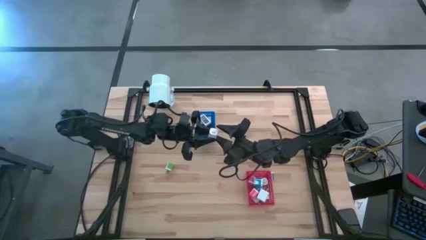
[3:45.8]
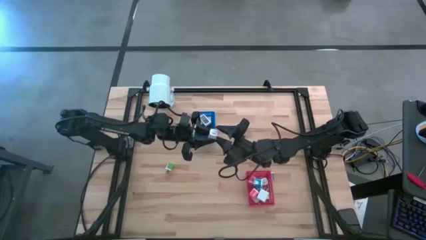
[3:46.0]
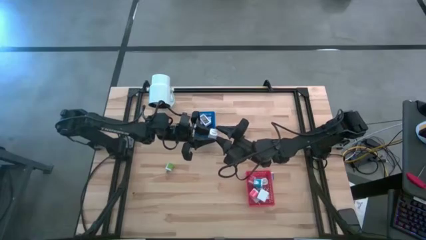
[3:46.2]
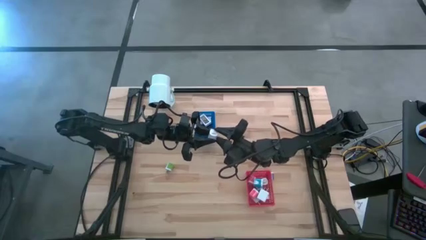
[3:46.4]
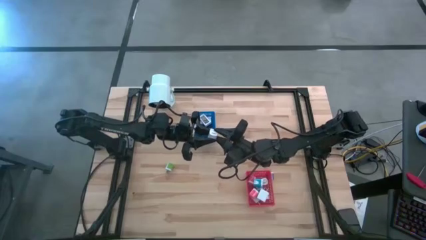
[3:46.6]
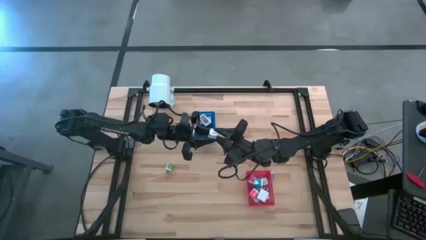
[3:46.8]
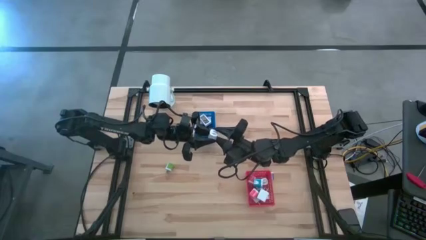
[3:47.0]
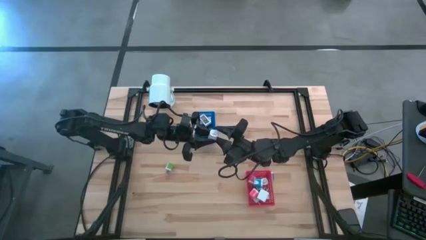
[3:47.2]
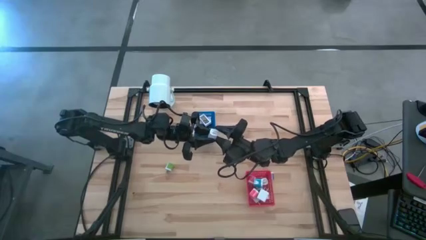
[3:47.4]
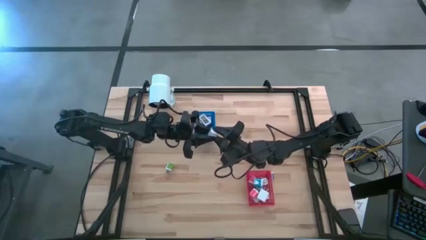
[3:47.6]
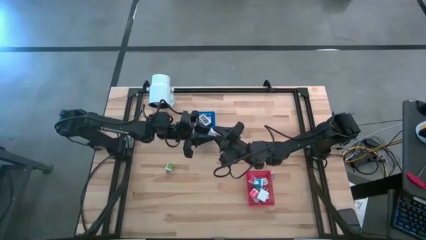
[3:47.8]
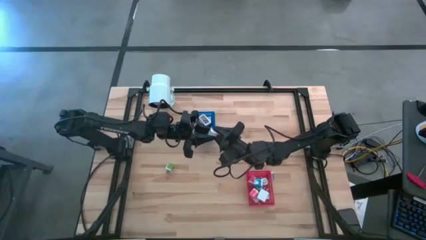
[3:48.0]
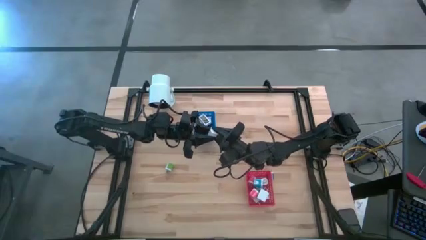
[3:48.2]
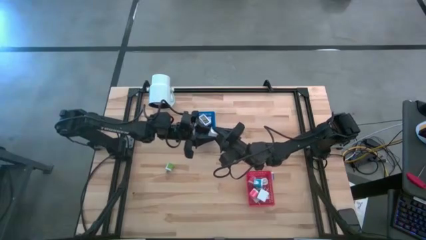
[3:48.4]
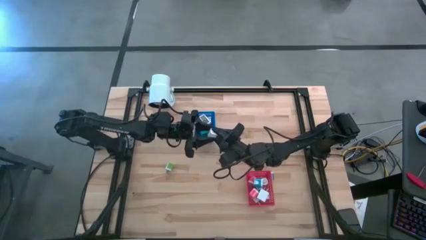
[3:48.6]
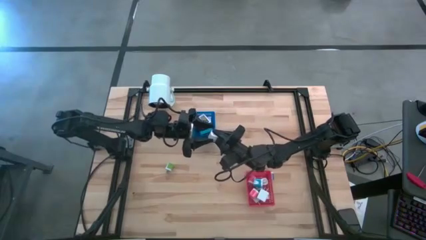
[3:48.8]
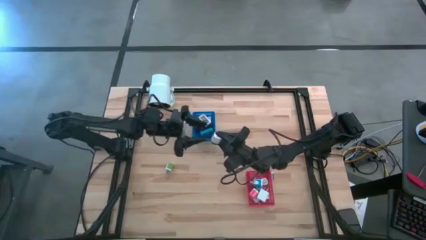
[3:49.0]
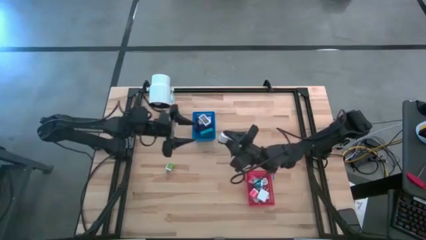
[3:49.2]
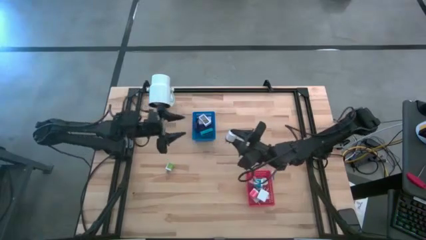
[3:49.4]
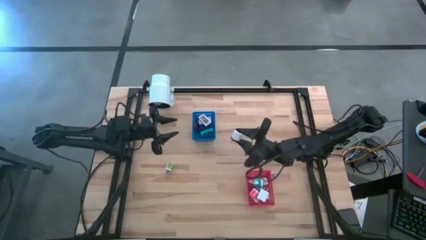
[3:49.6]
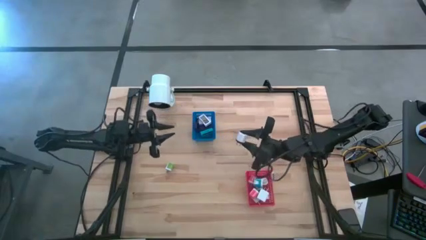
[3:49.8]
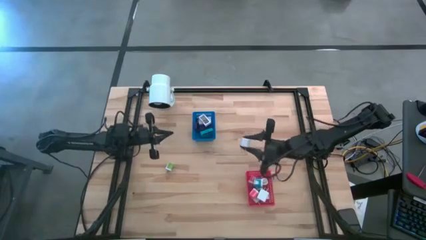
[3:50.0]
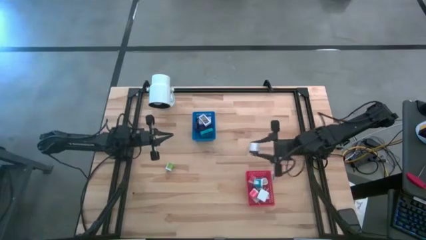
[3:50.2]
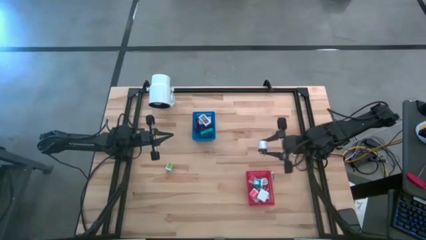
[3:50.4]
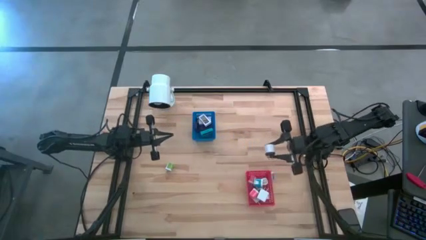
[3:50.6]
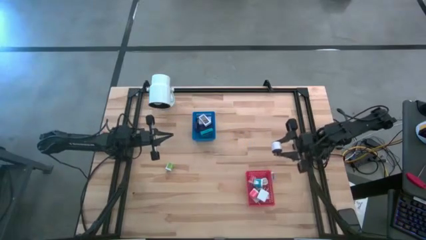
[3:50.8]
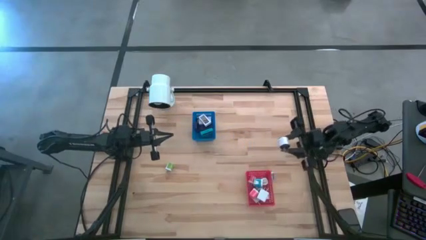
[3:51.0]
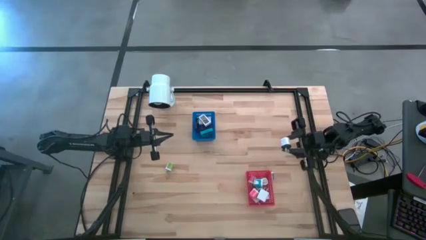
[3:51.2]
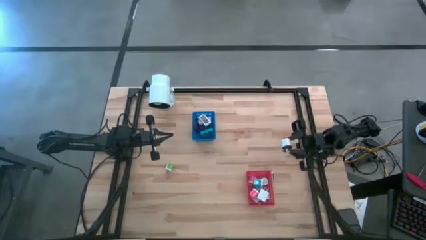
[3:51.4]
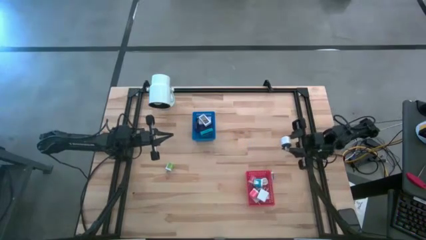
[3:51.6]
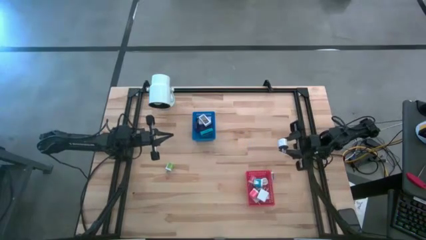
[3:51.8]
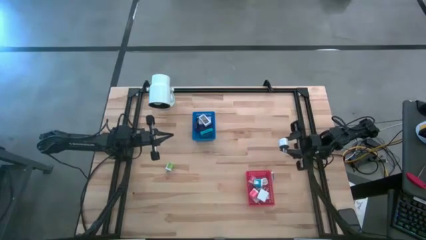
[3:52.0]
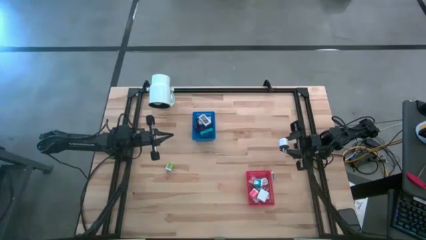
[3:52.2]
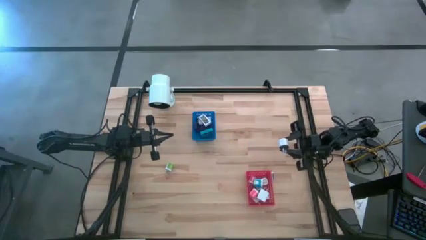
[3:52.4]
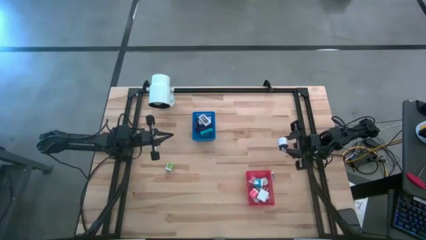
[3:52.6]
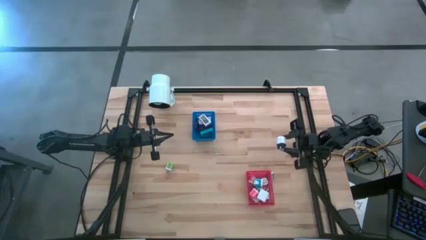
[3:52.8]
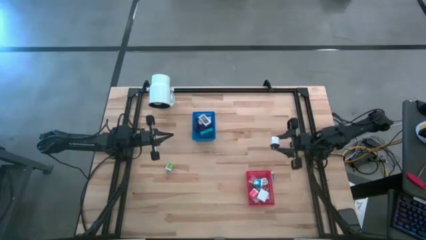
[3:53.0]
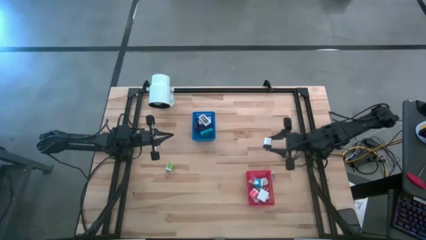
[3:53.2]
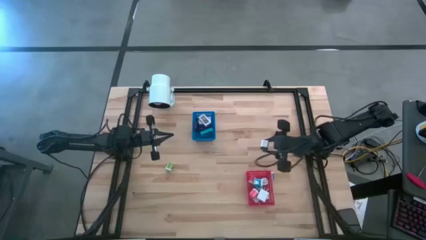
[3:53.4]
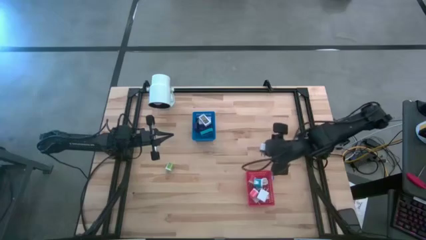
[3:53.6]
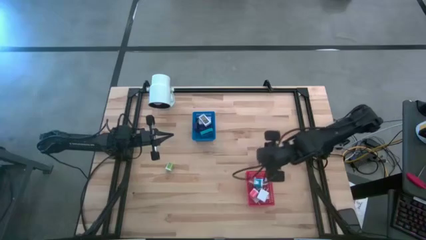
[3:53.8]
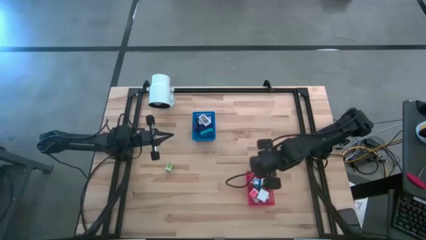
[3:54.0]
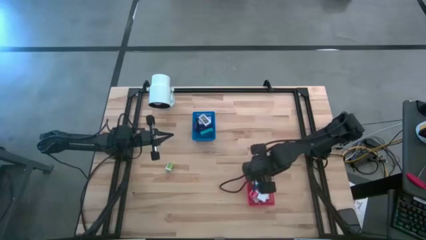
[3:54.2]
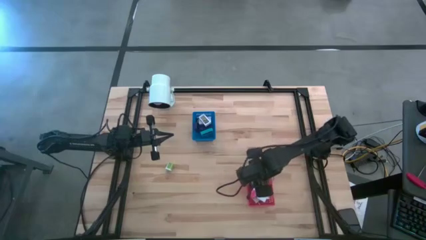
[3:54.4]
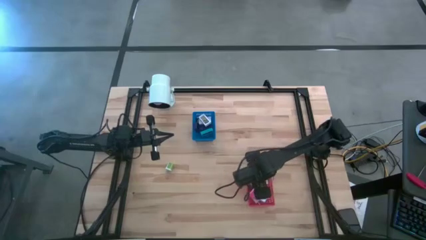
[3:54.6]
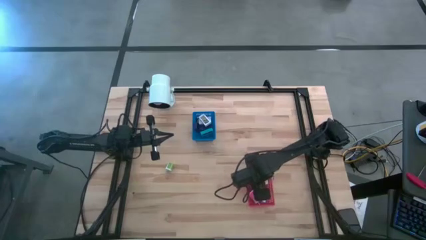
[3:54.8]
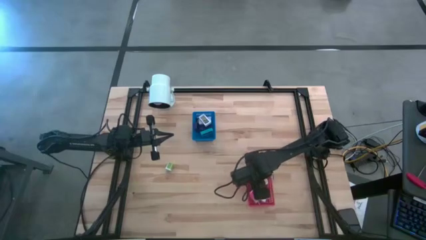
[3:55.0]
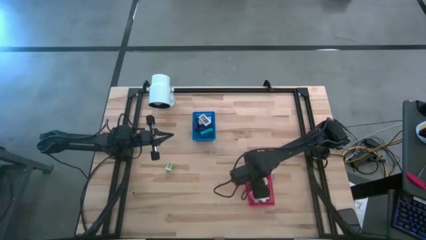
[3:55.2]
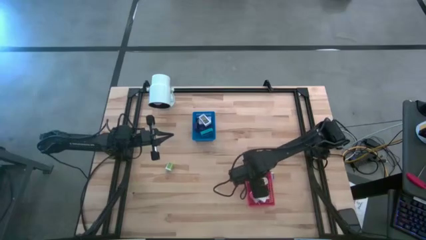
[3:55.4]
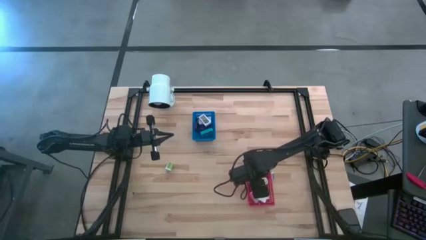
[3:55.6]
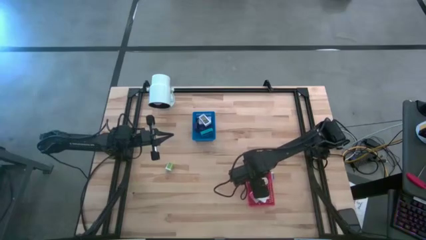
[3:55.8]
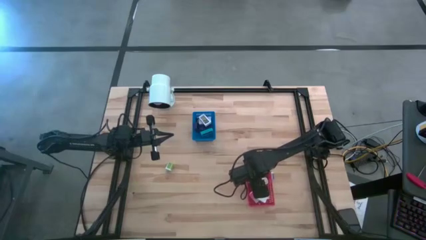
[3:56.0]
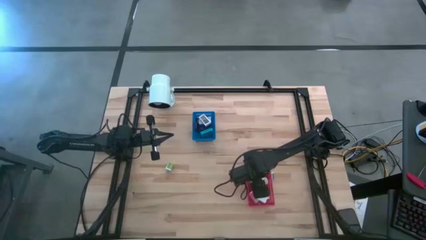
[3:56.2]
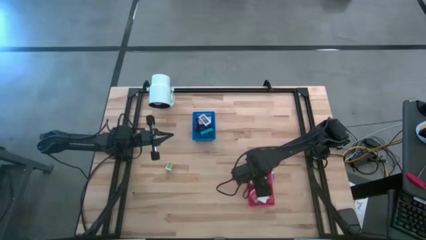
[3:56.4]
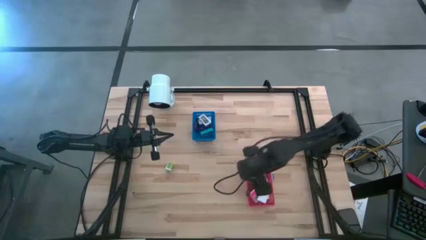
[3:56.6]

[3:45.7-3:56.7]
Task: Pick & Place Office items
Put the white and black charger adapter into the red bin

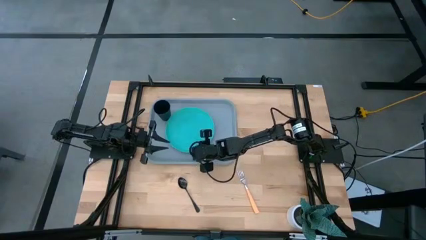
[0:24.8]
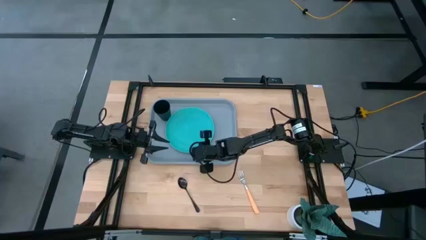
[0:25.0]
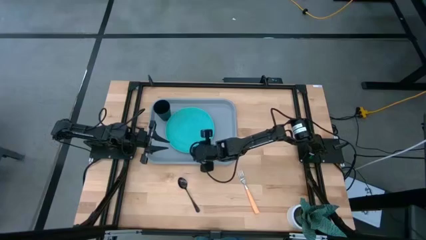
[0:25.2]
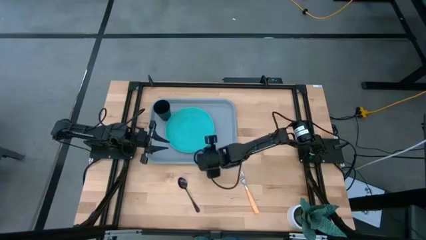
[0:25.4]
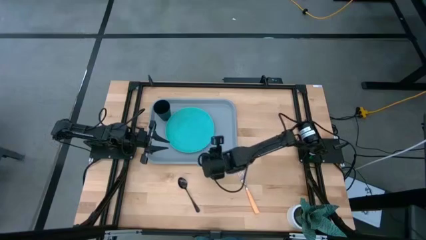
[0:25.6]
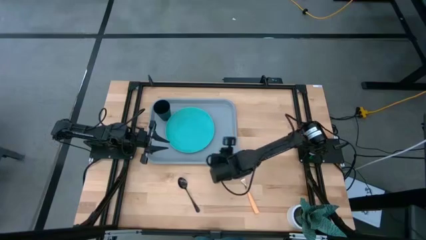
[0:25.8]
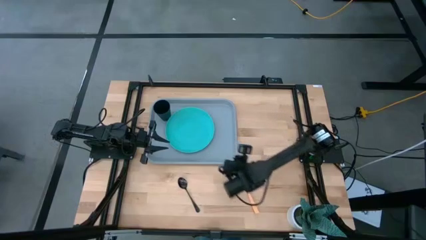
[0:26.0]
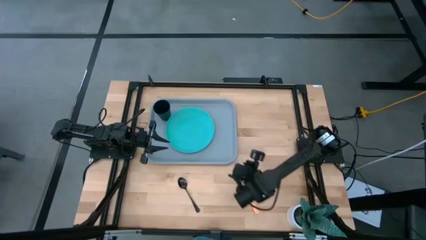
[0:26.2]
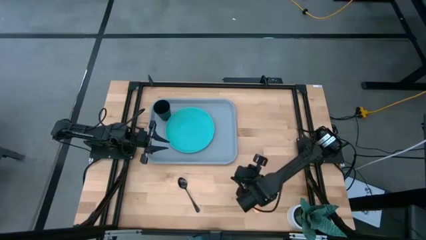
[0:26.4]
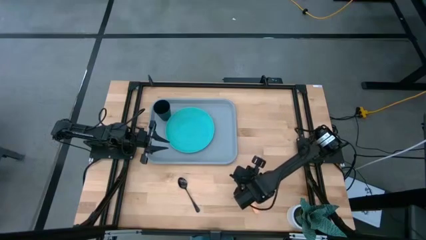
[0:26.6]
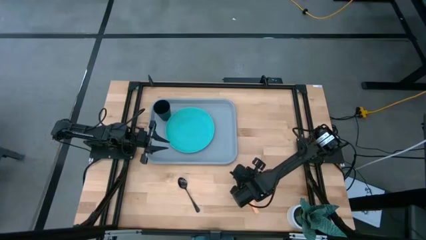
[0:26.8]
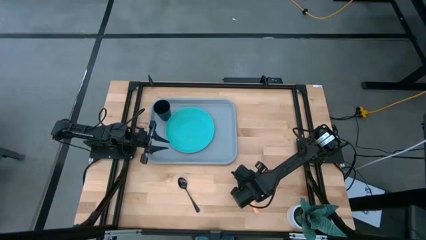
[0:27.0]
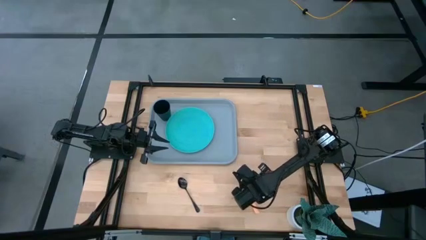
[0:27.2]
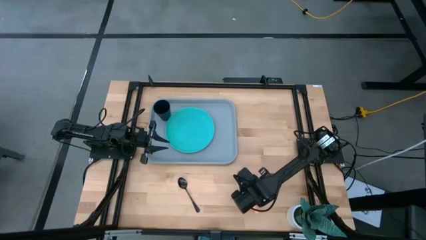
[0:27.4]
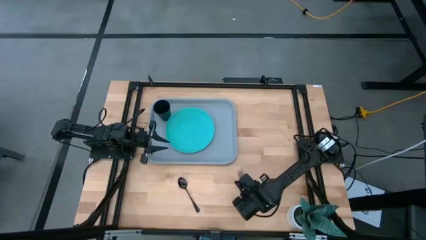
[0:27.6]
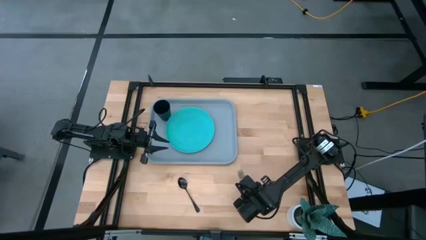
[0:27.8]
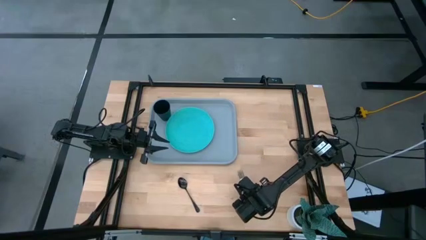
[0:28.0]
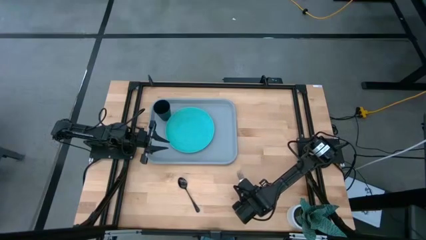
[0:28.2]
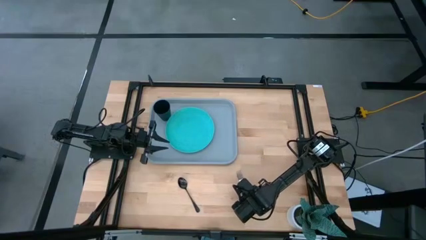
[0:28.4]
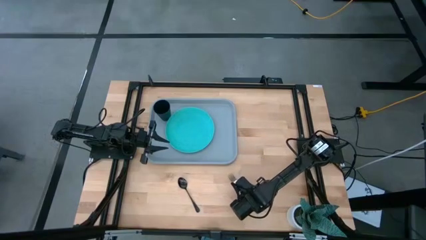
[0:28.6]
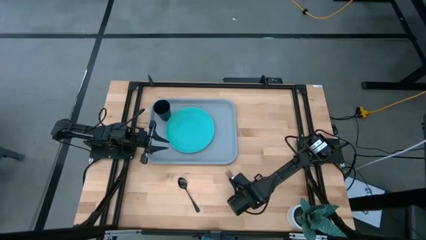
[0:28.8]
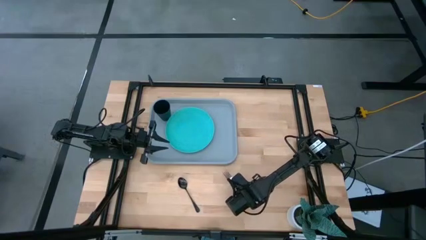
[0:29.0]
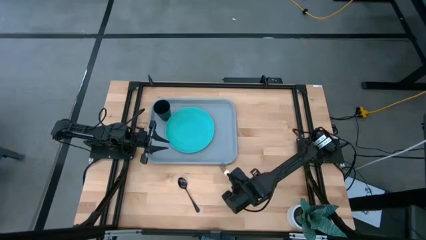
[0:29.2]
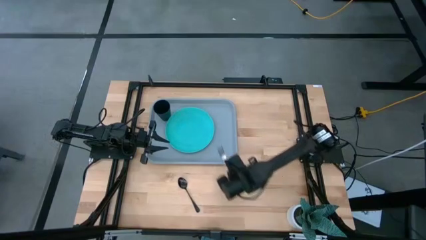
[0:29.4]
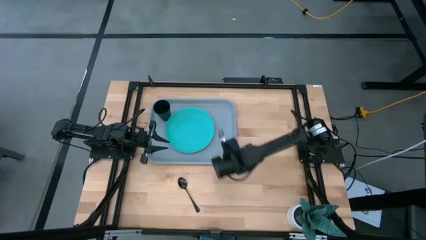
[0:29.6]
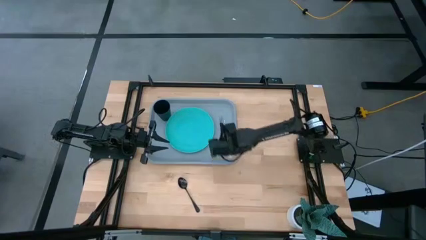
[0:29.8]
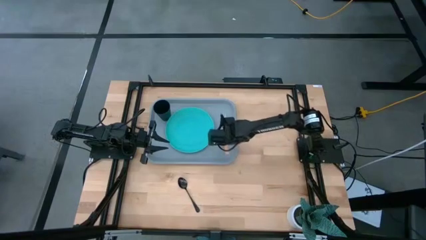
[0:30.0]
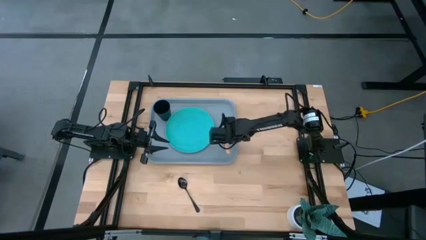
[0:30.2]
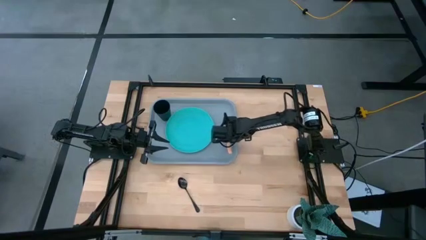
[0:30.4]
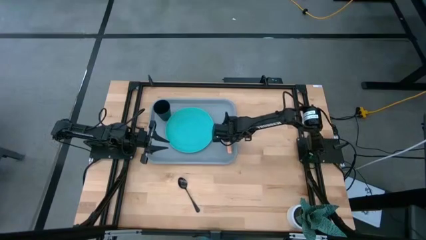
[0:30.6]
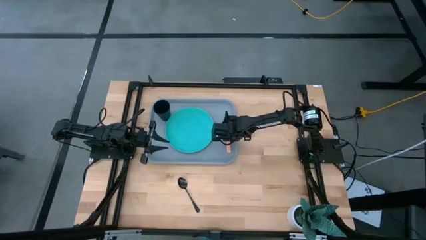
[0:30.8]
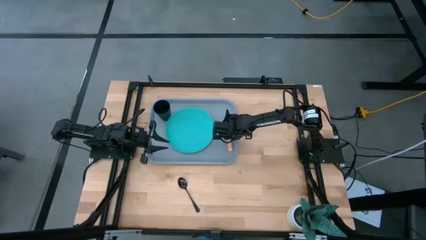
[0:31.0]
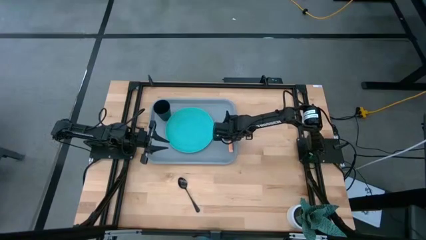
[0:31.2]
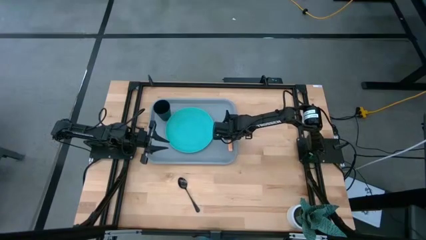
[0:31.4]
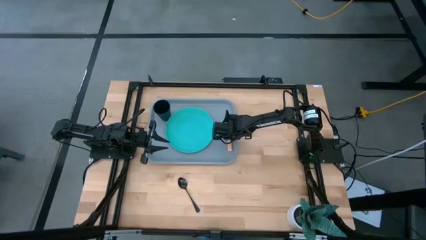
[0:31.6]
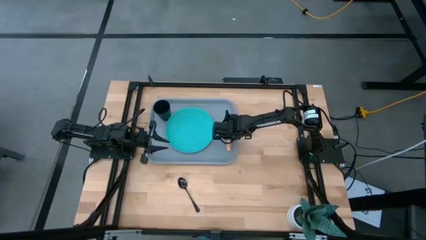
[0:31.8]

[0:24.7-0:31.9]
Task: Pick and place plate/cup/fork/spoon on tray
Put the orange fork on the gray table tray to the right of the light blue plate
